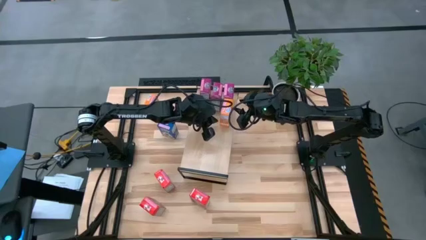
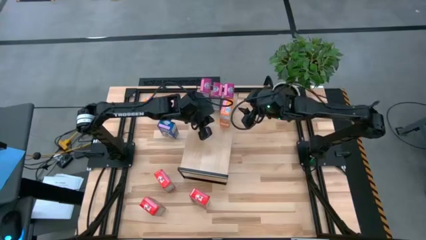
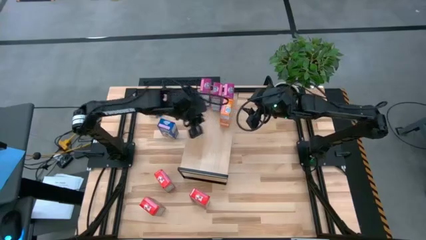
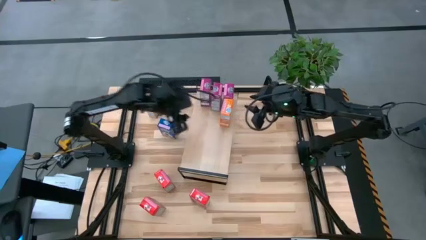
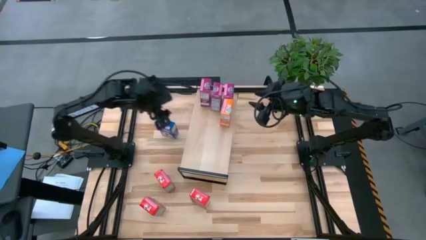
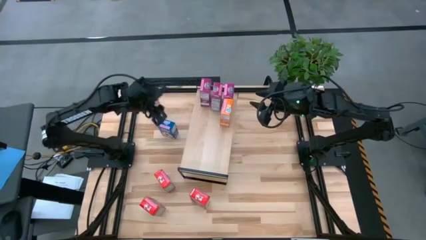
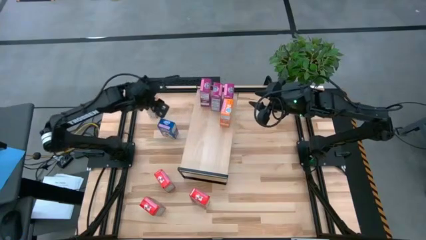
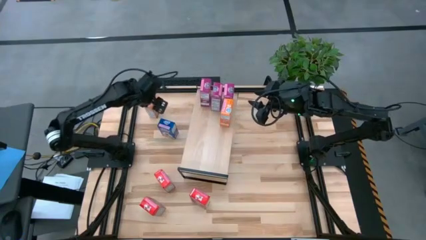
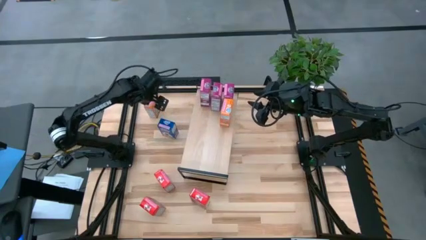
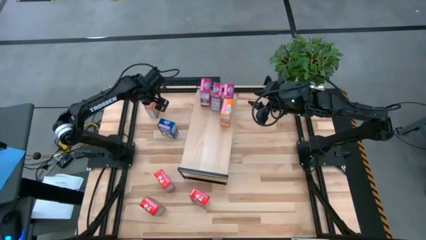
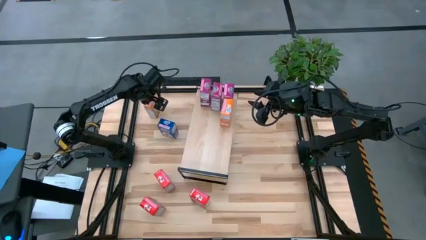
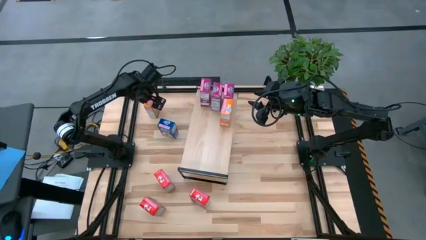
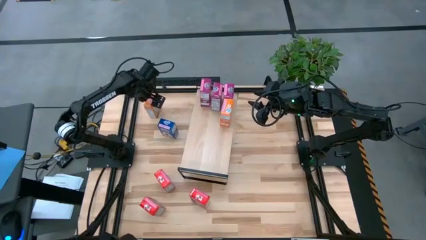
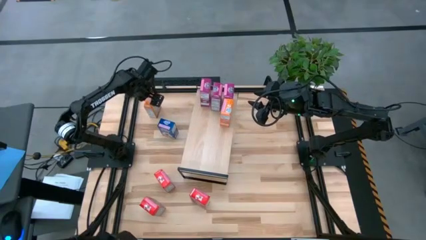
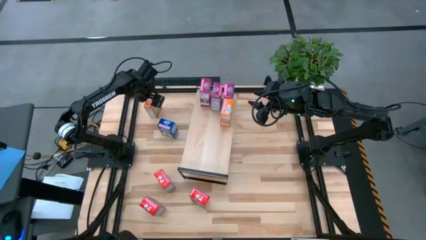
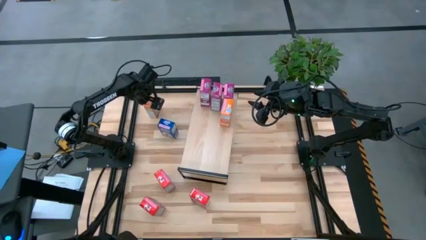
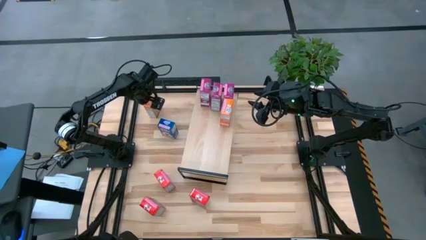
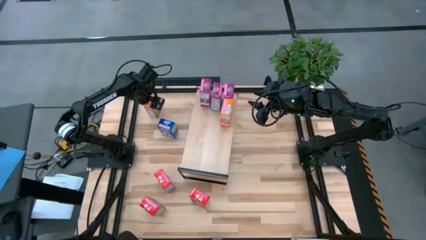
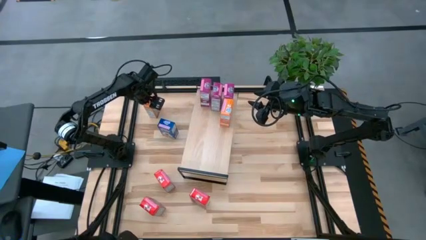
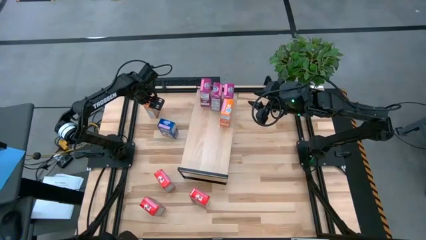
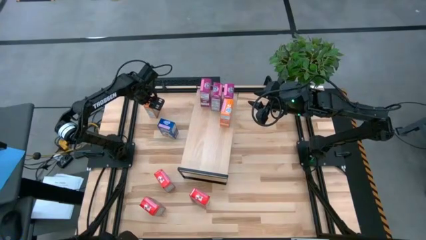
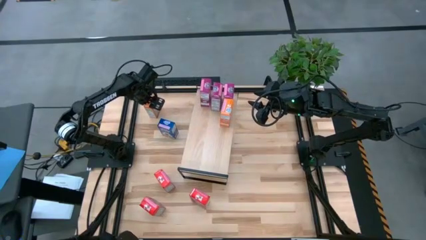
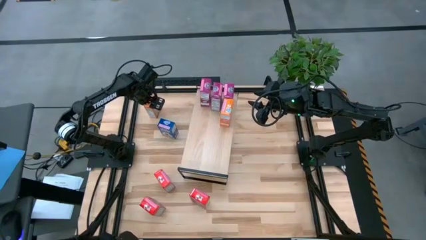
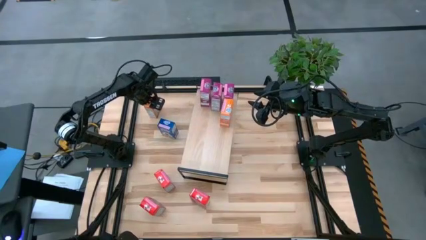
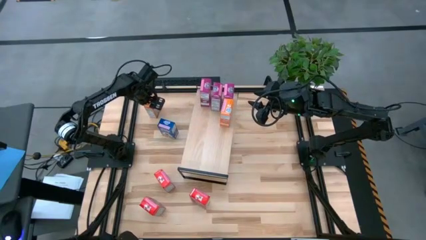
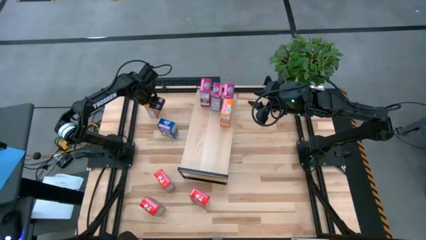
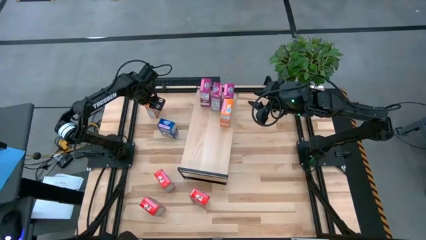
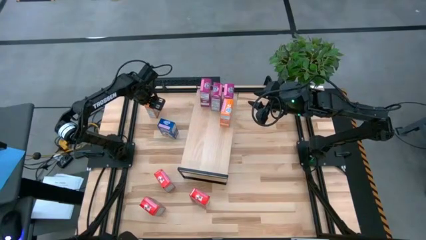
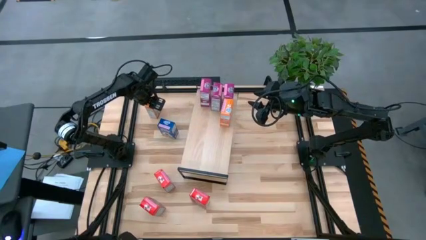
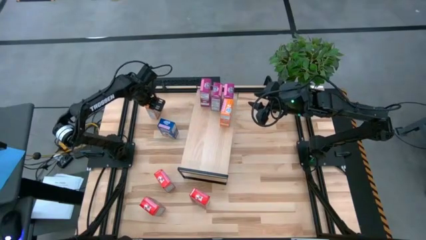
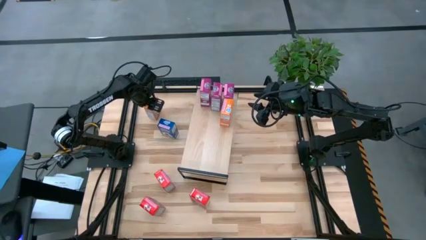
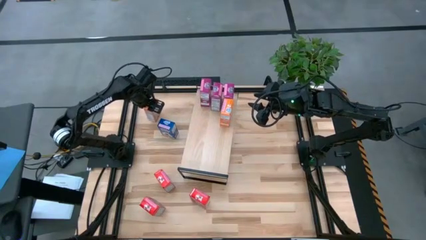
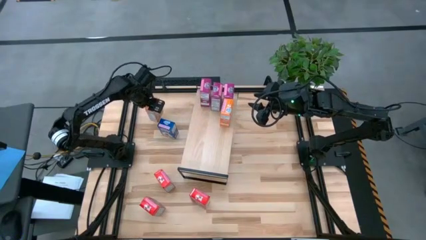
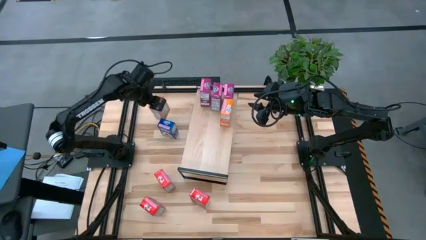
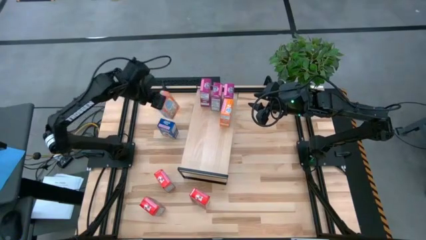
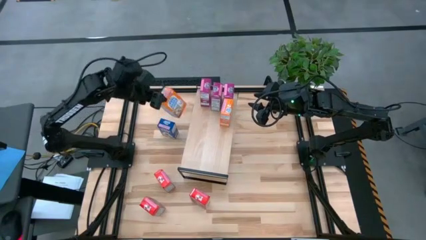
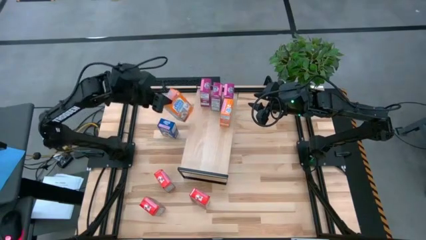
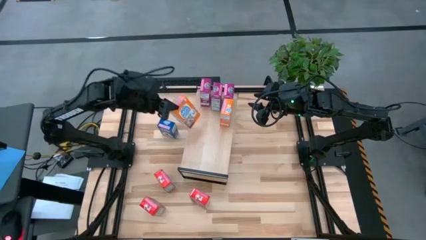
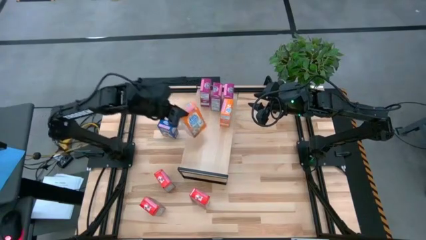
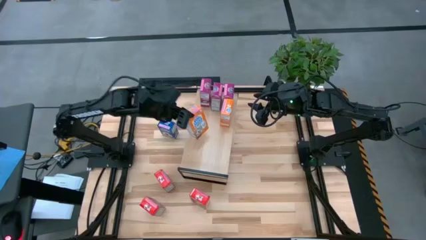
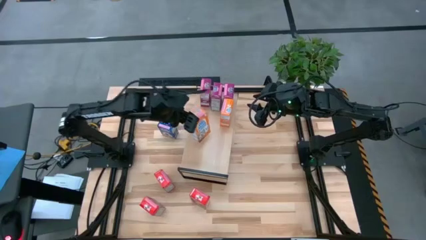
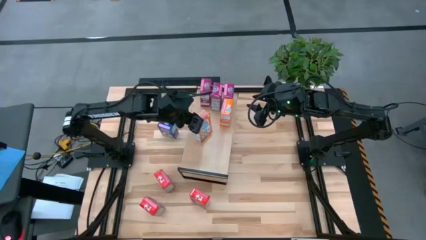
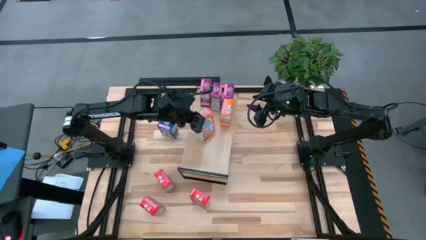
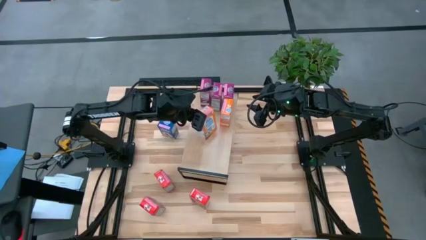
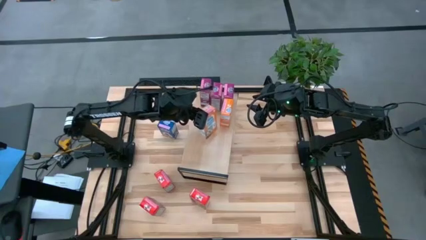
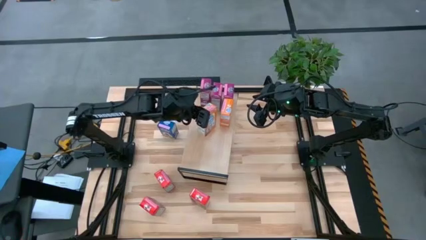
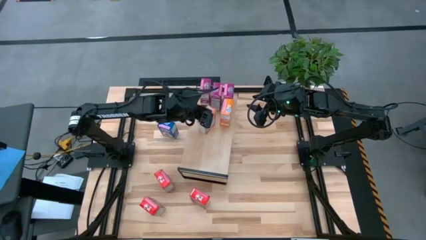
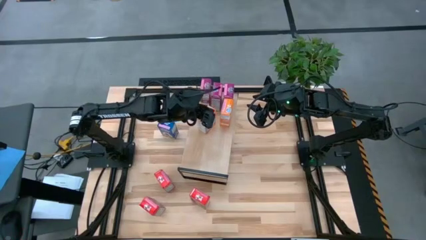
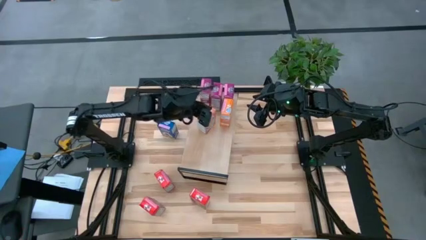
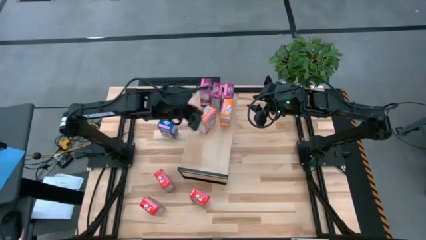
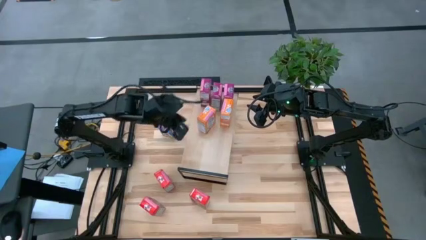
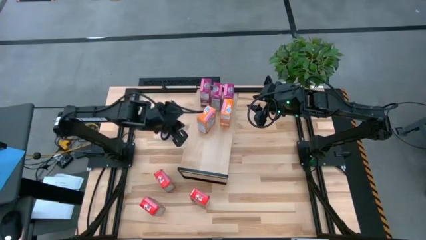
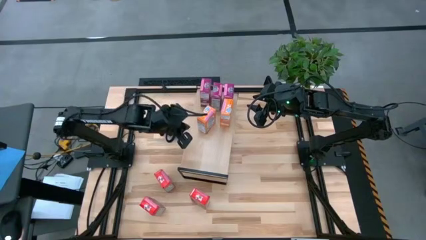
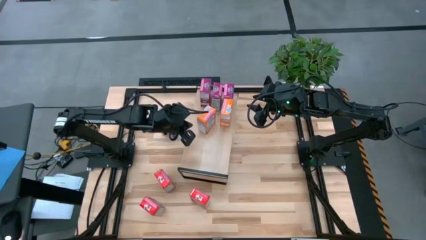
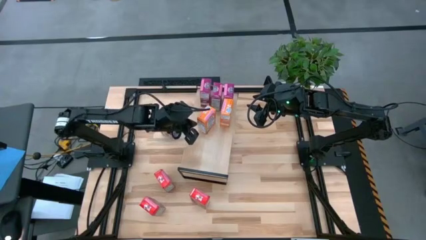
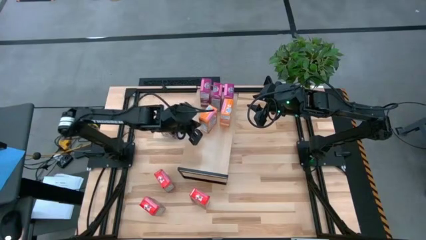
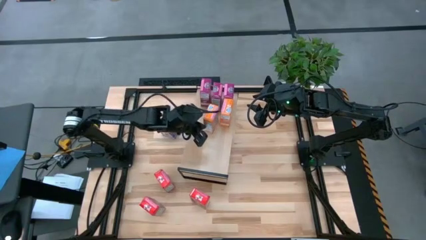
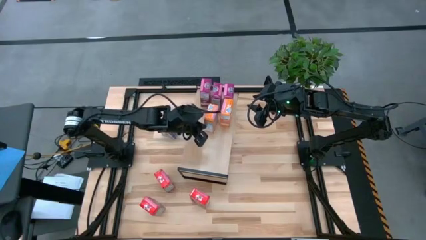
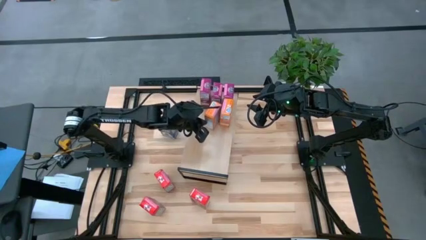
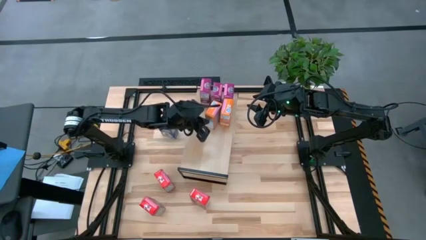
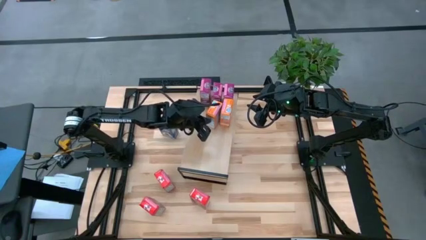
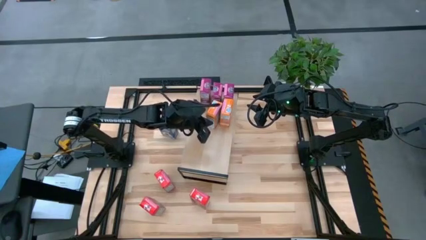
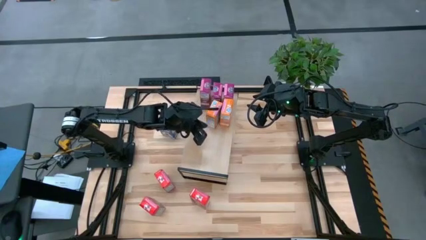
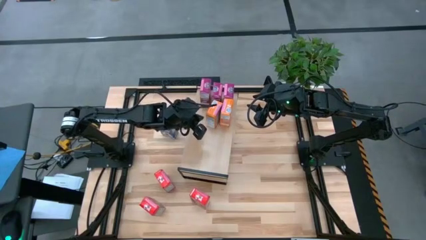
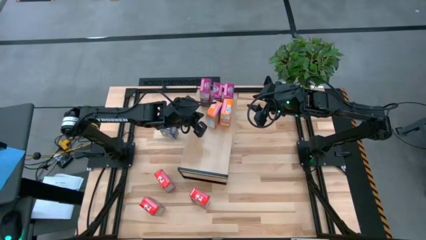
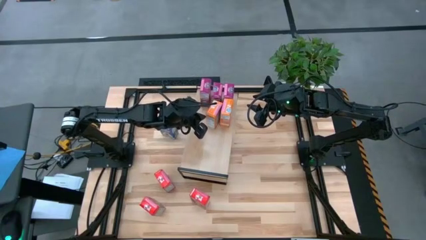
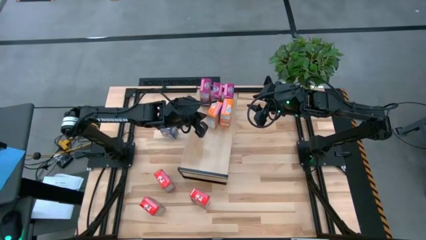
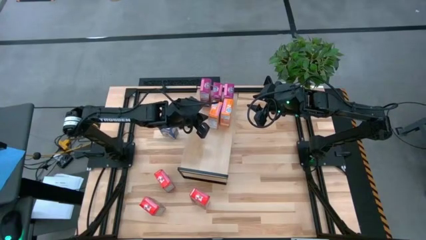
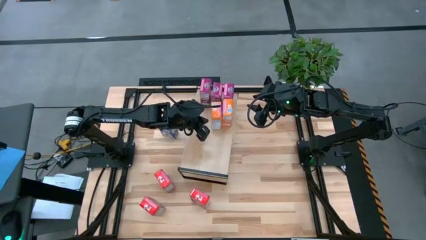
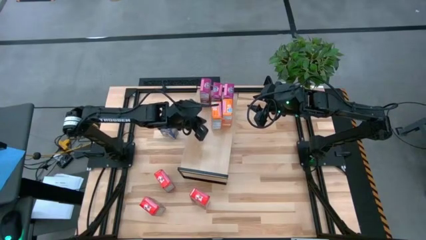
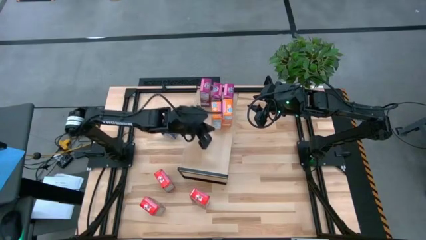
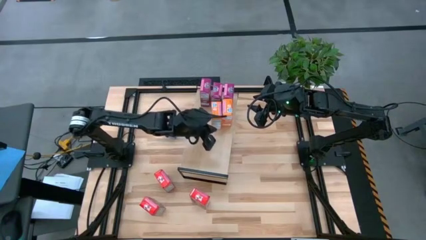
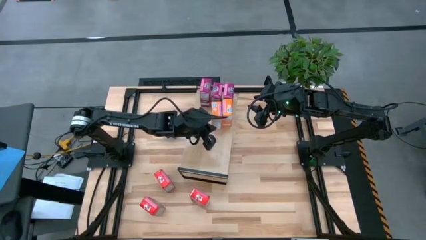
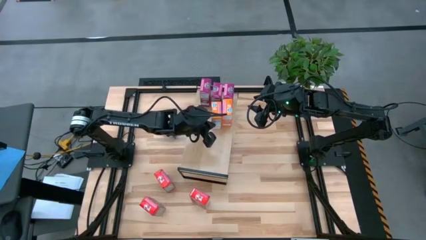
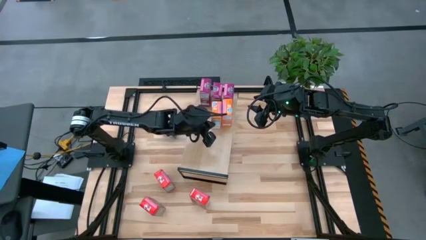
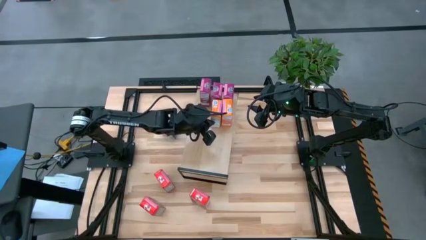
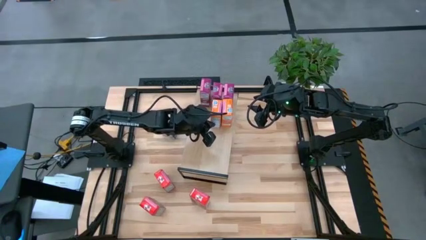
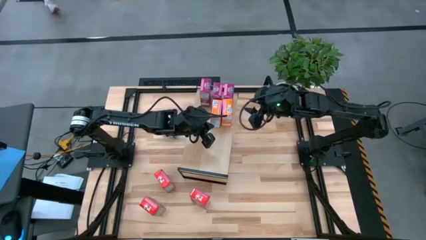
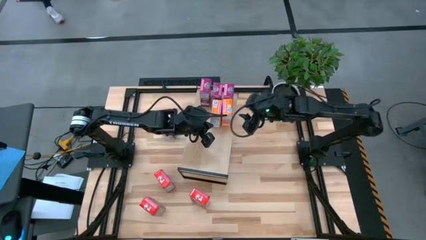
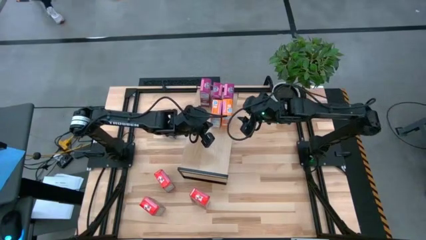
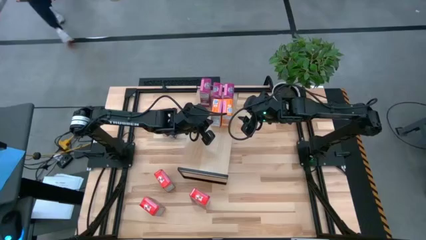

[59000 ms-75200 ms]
Task: Stack cereal on shelf
Put the orange cereal box on the shelf
